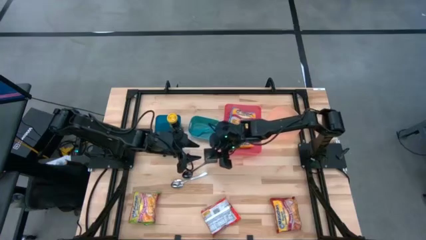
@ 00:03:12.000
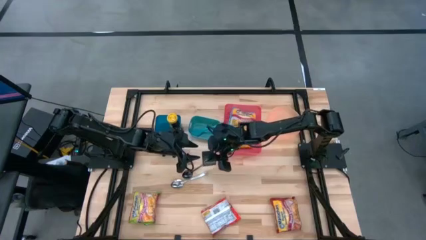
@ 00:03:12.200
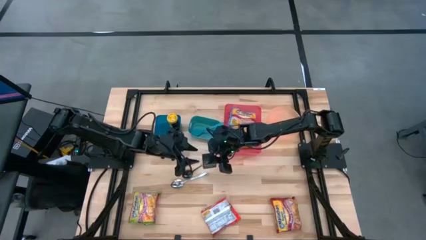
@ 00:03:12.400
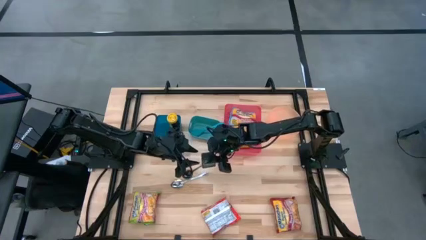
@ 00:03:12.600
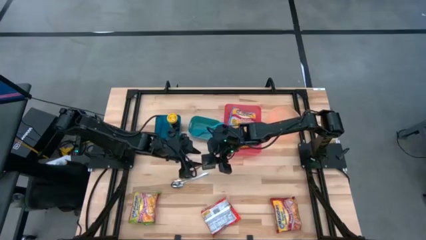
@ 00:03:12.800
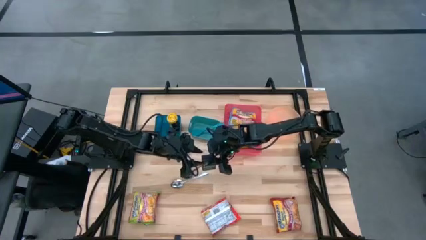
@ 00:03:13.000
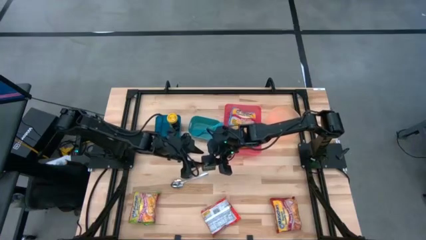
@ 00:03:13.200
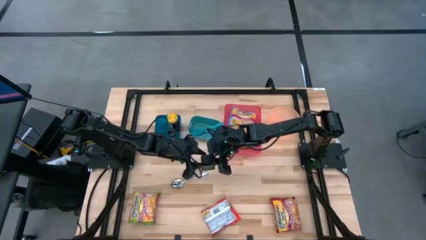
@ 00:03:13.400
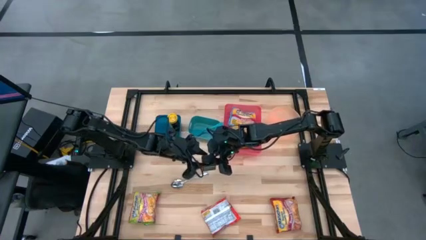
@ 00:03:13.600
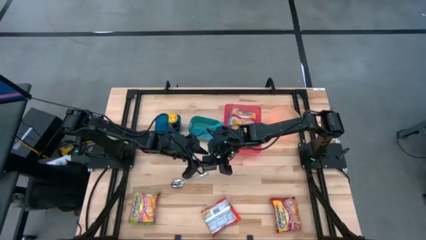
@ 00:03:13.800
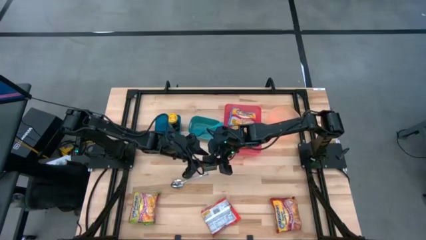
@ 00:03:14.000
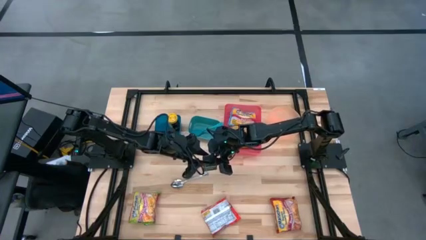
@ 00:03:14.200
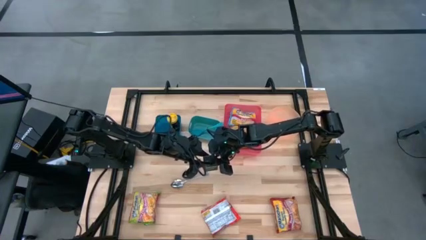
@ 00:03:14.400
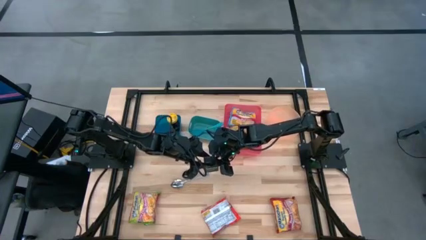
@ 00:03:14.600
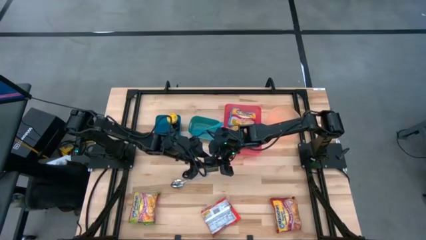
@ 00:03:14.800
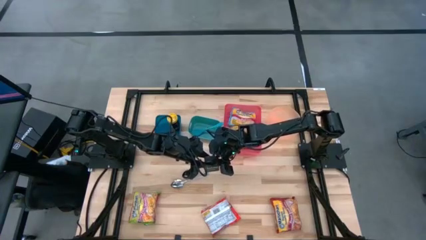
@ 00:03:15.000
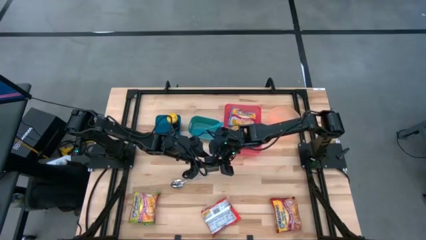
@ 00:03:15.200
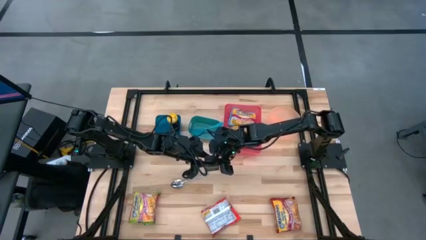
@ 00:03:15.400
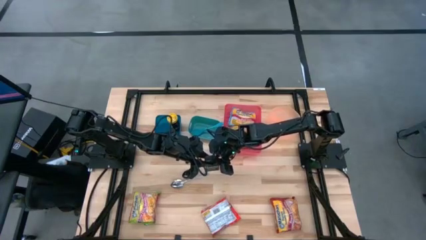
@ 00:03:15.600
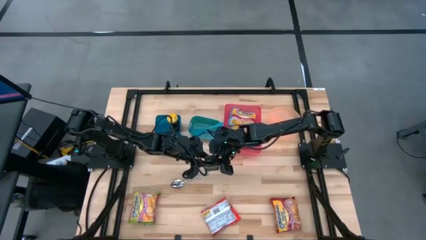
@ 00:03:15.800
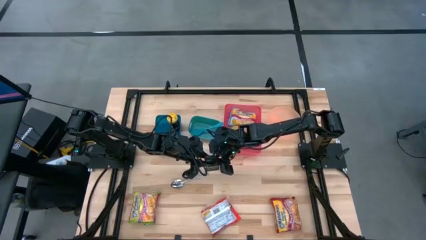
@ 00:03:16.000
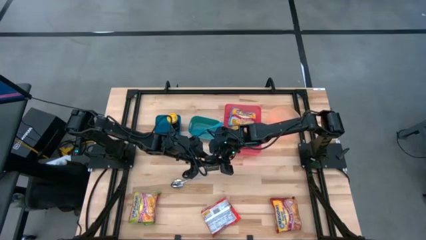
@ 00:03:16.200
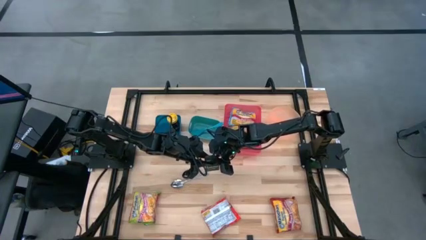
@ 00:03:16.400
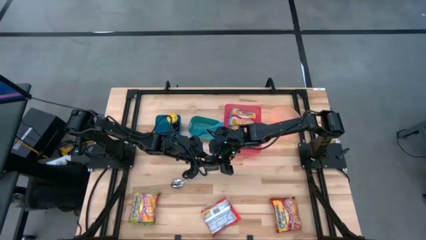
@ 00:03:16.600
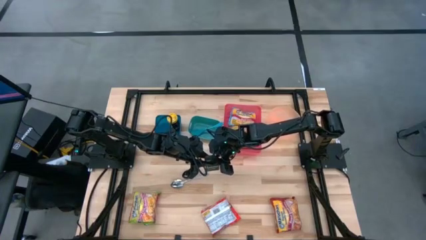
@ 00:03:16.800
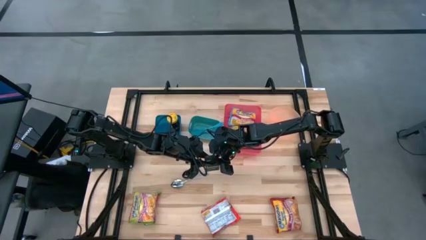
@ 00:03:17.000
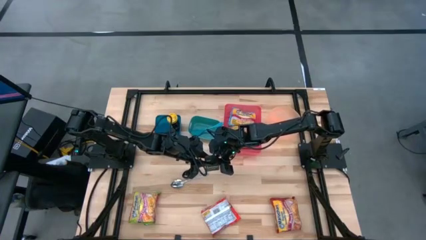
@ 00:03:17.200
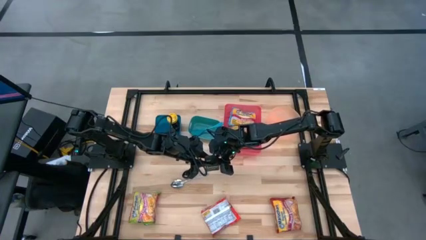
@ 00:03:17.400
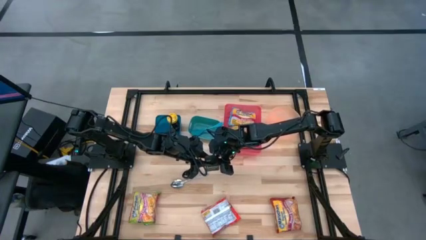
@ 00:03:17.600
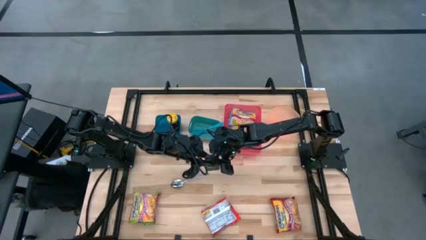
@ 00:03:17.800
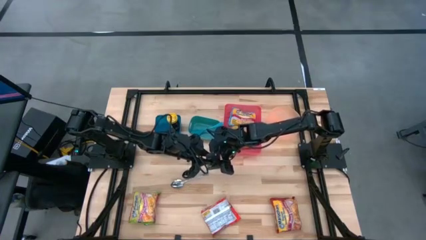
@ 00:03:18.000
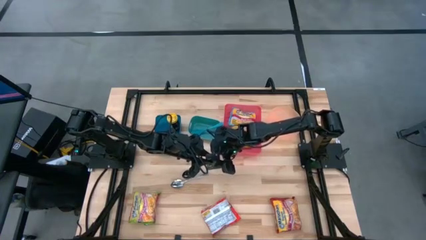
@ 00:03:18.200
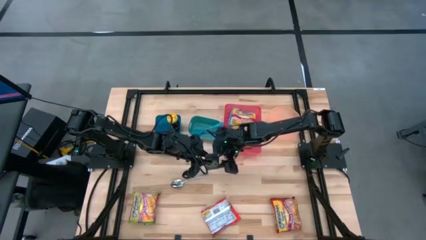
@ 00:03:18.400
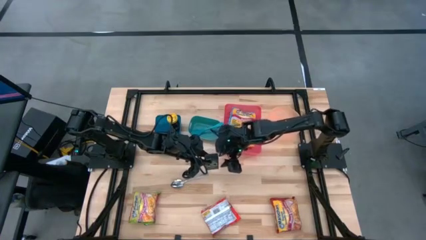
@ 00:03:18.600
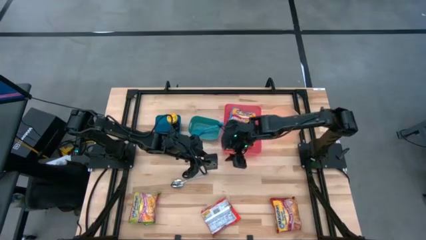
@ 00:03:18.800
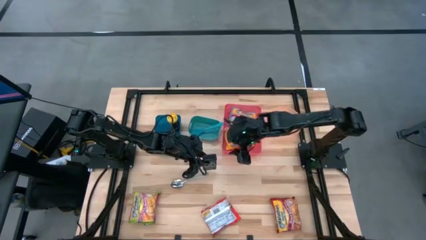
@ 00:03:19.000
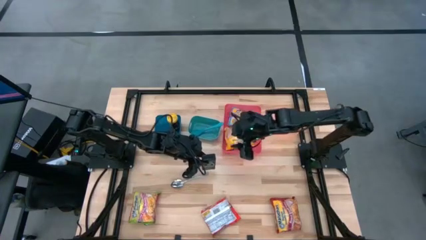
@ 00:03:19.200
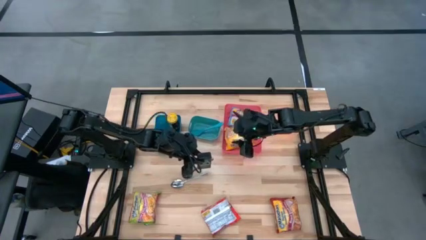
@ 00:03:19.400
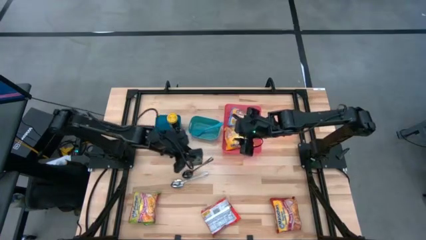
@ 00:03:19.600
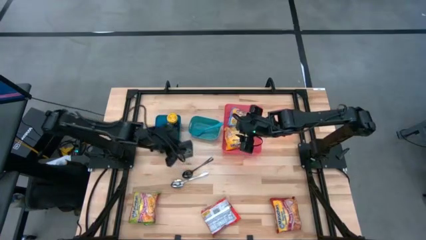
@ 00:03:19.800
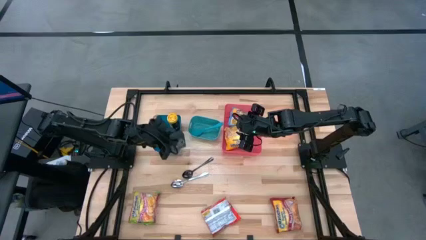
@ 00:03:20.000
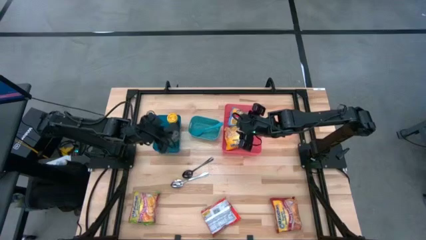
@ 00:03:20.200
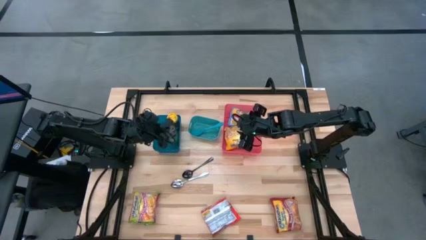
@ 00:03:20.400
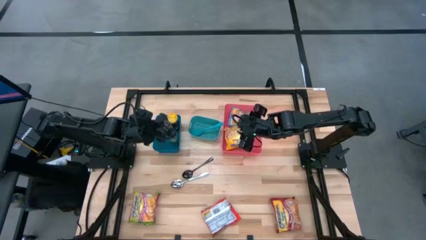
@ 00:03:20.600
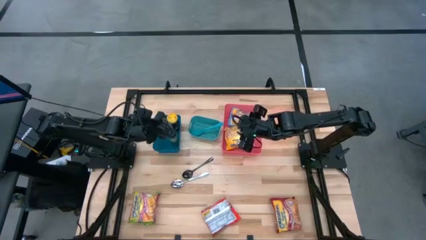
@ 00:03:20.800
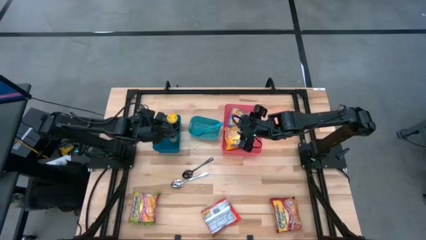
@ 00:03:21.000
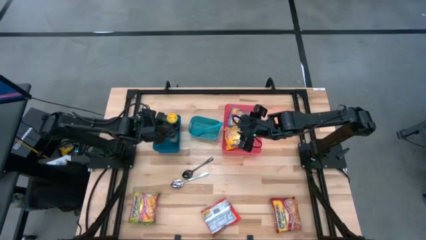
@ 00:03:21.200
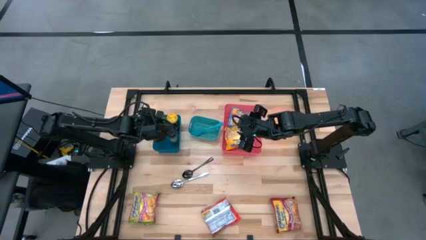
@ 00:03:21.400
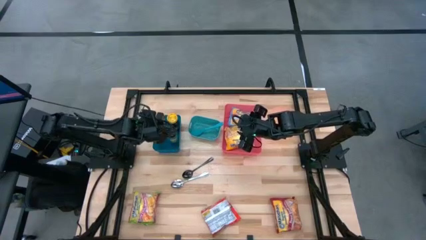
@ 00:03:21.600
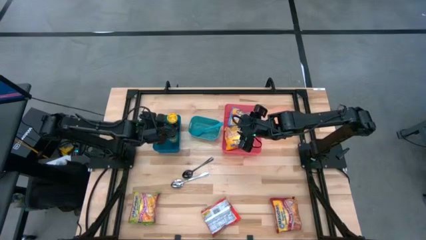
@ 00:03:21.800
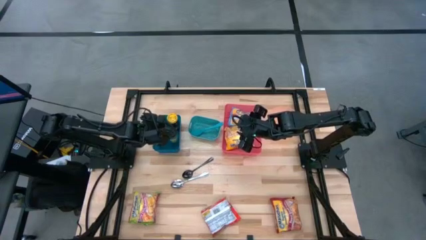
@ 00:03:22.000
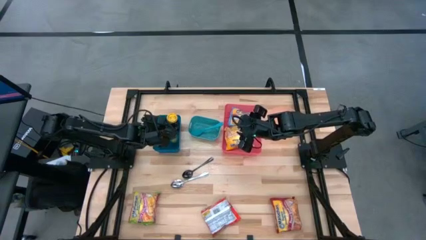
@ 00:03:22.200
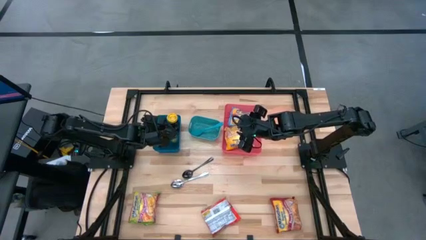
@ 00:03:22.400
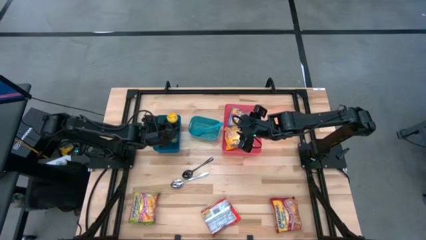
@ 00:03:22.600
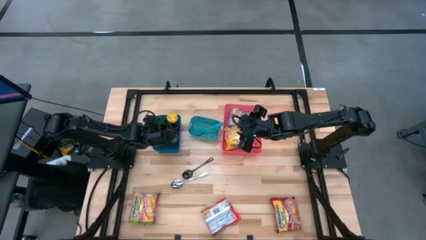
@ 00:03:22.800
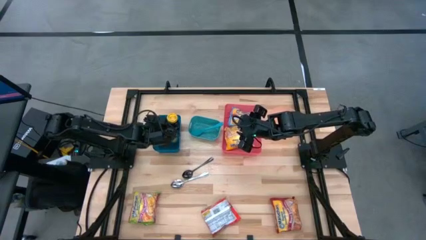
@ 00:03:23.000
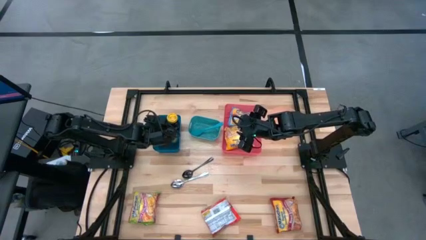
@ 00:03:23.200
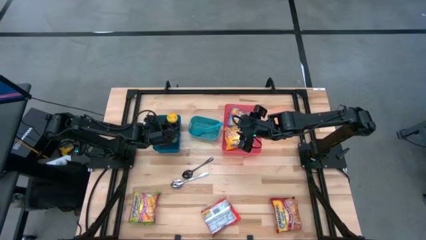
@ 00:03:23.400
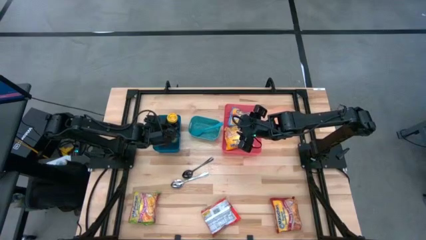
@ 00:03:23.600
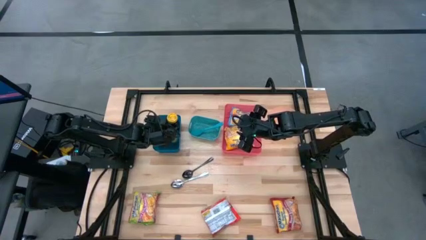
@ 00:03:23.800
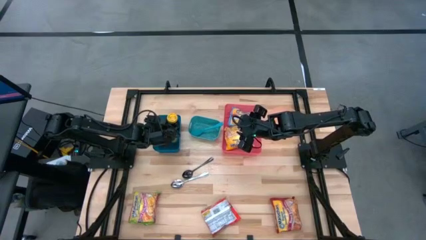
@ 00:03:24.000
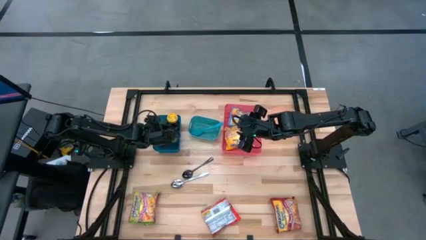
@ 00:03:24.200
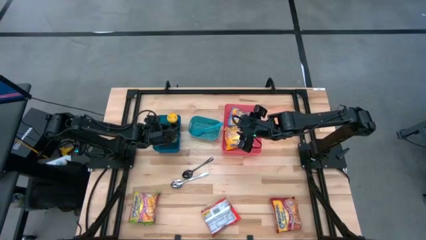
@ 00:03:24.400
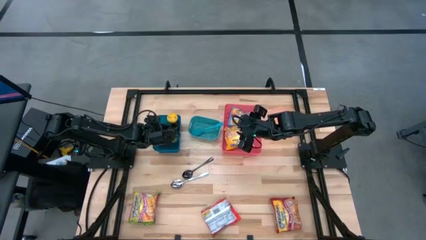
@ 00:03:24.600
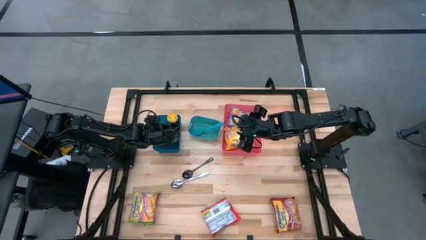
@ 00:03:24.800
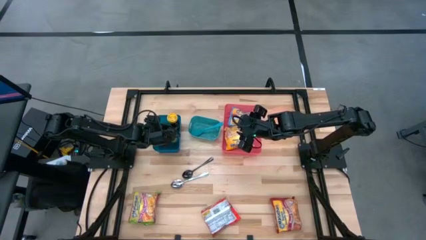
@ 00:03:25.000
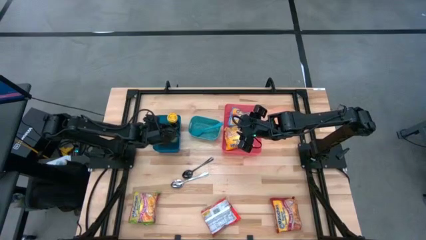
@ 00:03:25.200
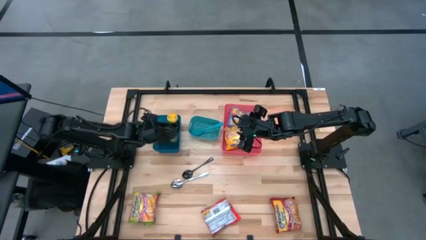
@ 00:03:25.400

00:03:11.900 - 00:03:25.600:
Task: Pick & Place Food Item
Put the black seasoning can into the blue bin

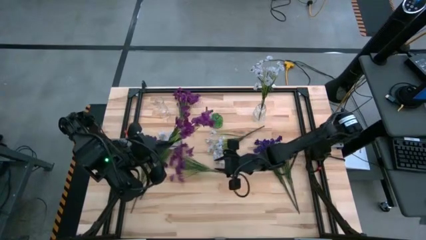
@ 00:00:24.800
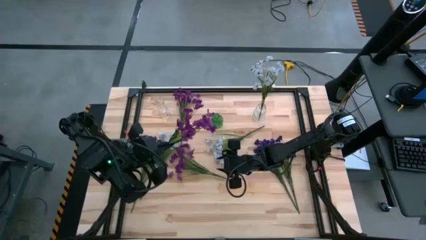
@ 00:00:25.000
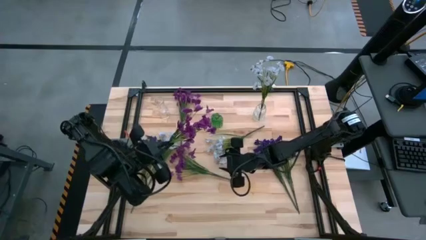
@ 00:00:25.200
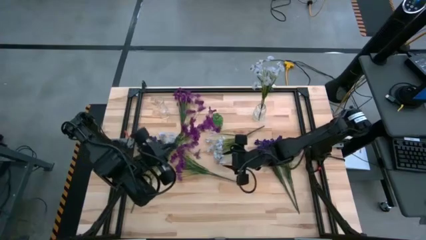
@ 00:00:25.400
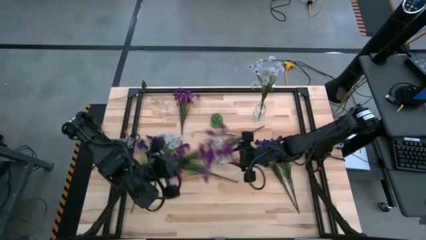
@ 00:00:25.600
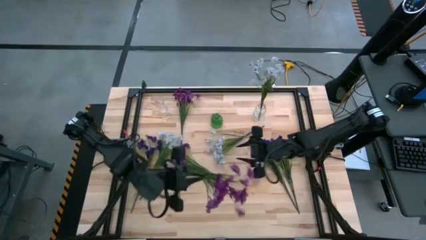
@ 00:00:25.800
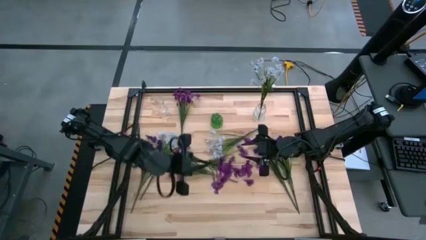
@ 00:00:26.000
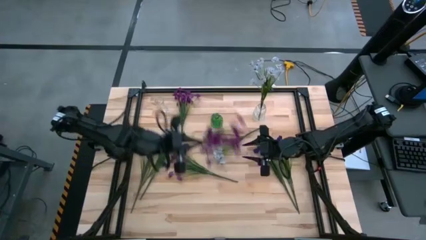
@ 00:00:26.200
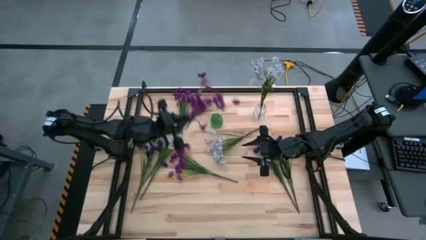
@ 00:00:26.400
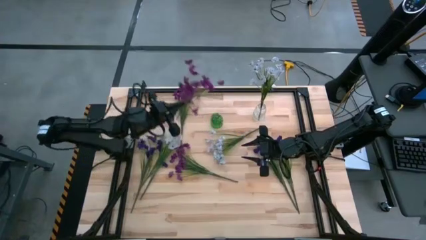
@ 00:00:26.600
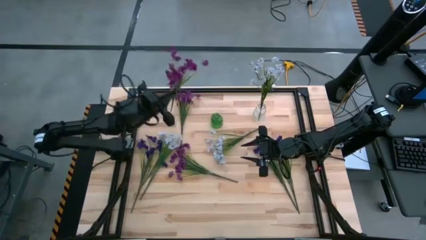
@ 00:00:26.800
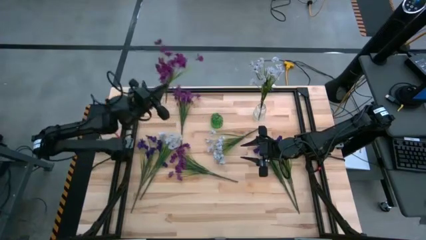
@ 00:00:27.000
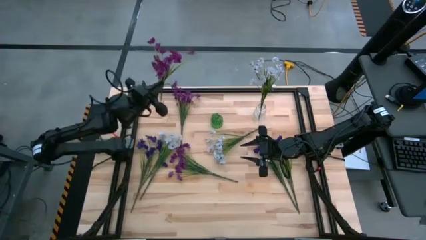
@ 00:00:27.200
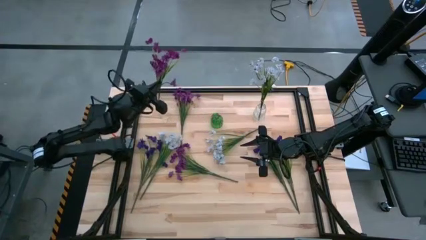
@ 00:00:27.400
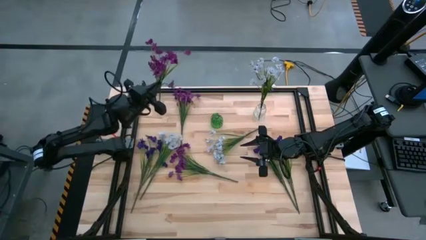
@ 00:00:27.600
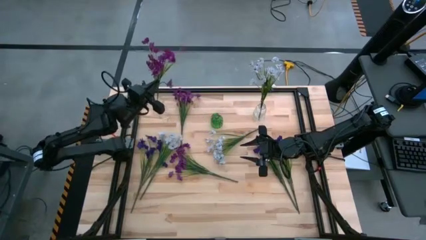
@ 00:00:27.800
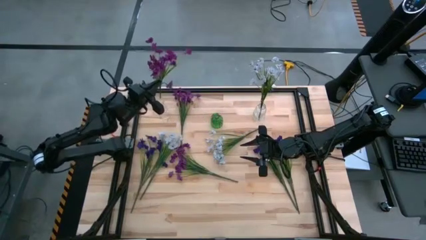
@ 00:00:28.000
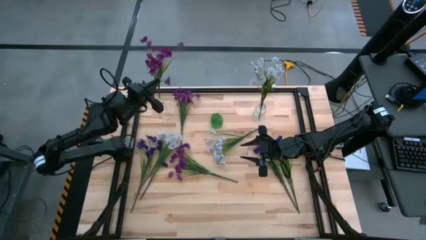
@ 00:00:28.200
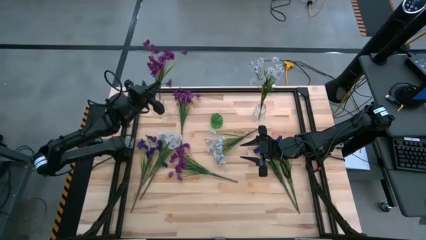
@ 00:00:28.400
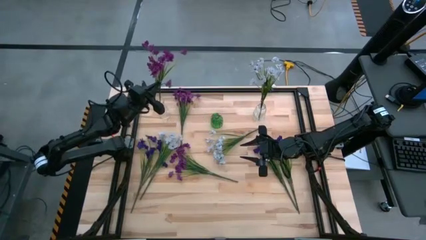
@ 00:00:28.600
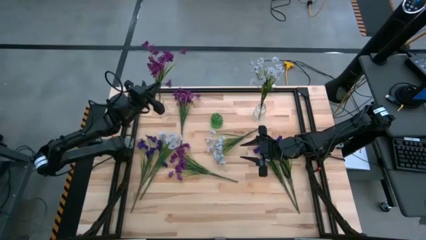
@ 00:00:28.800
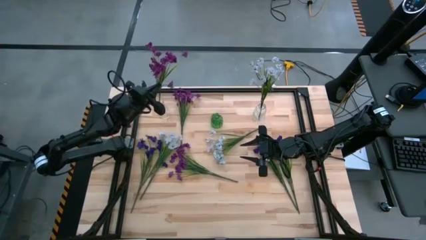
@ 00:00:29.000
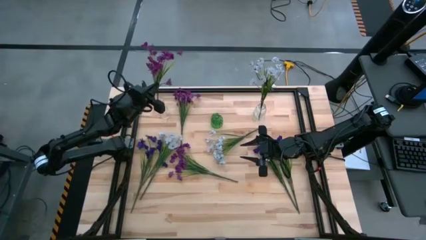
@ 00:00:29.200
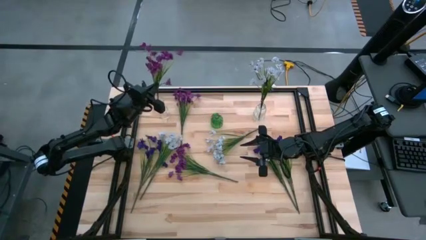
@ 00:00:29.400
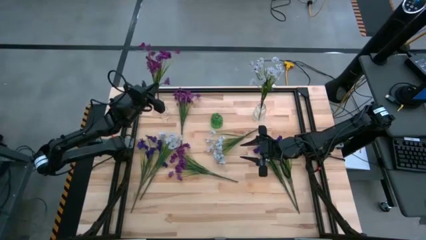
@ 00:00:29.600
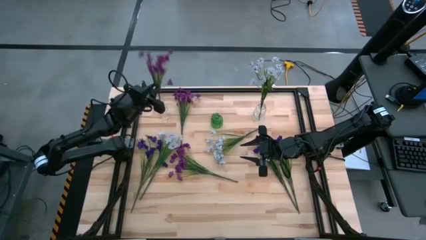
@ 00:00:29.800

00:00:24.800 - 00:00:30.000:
Task: Sort flowers into vase by color
Put the bottom violet flowers into the left transparent flower vase
